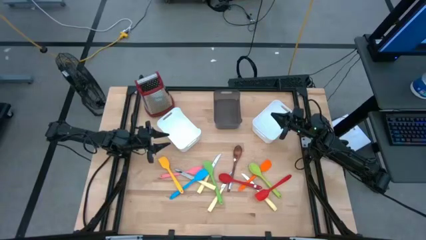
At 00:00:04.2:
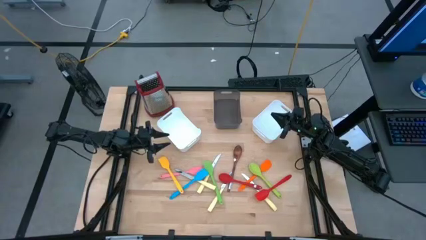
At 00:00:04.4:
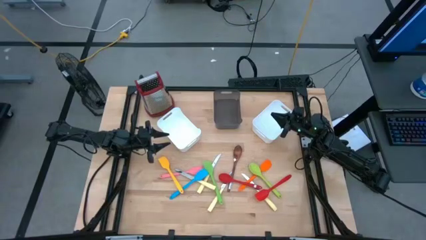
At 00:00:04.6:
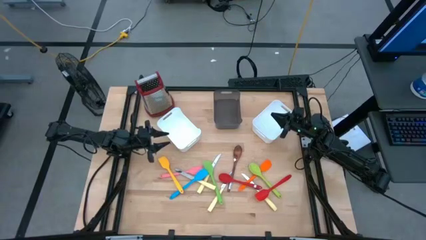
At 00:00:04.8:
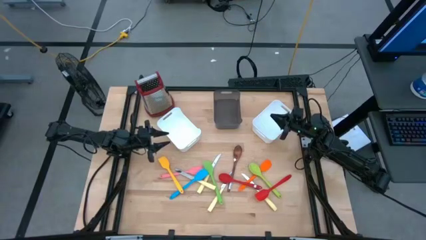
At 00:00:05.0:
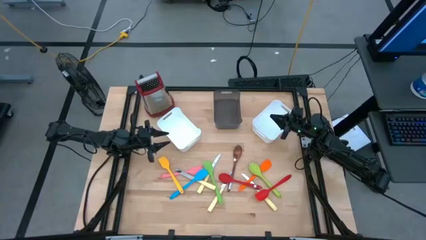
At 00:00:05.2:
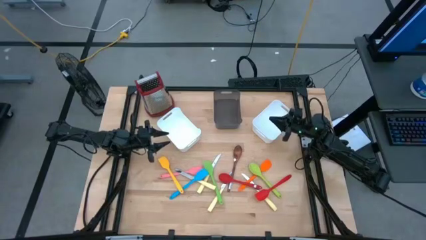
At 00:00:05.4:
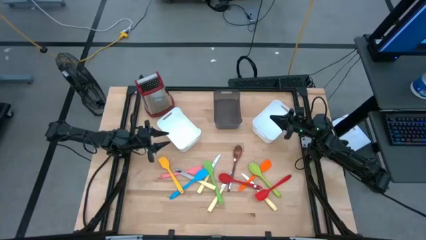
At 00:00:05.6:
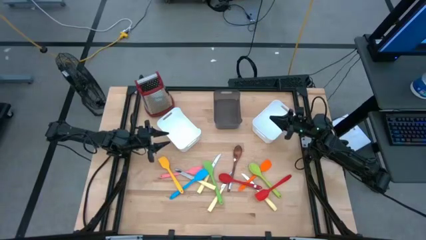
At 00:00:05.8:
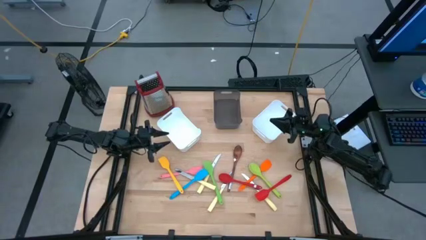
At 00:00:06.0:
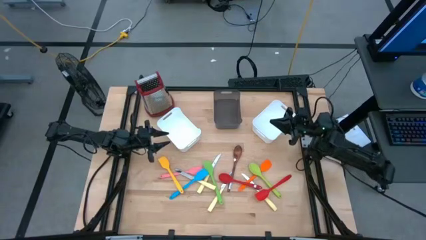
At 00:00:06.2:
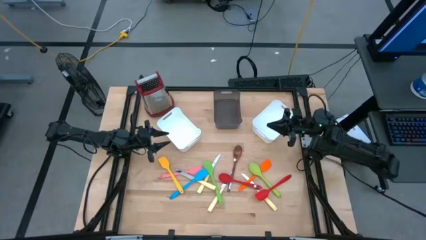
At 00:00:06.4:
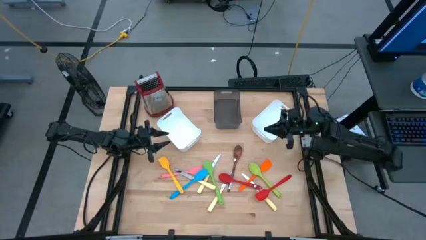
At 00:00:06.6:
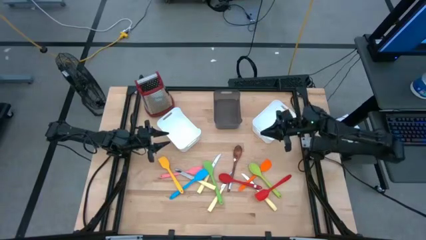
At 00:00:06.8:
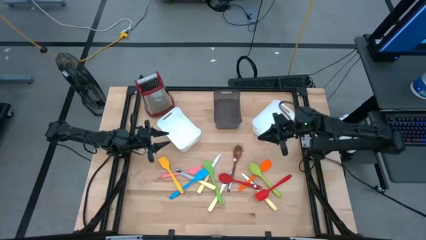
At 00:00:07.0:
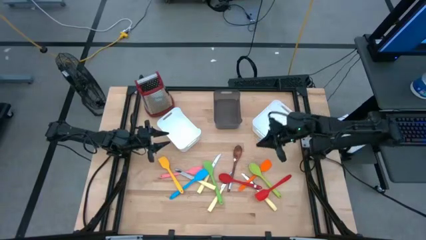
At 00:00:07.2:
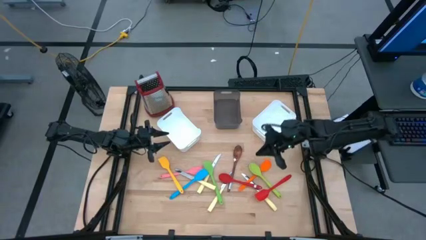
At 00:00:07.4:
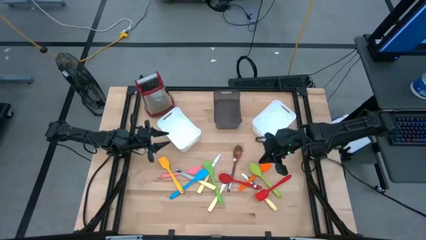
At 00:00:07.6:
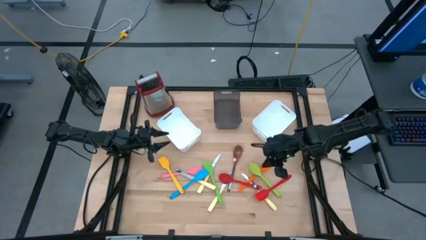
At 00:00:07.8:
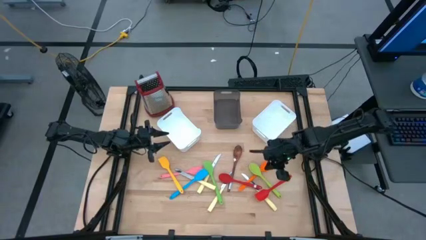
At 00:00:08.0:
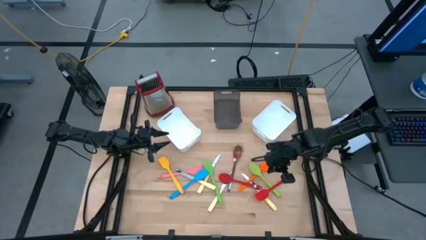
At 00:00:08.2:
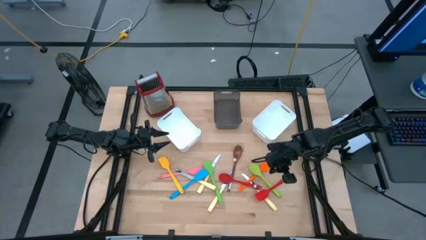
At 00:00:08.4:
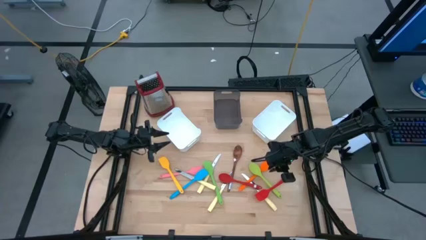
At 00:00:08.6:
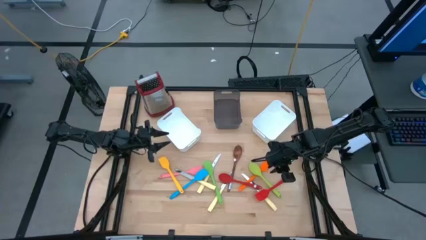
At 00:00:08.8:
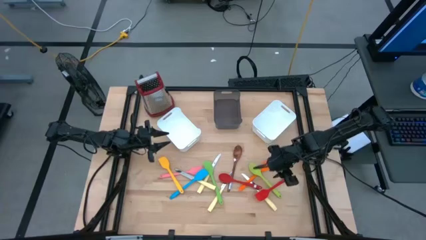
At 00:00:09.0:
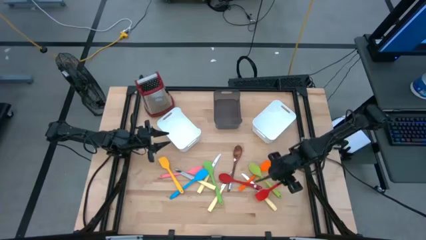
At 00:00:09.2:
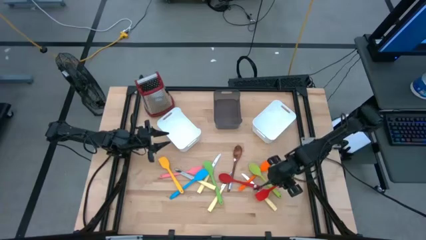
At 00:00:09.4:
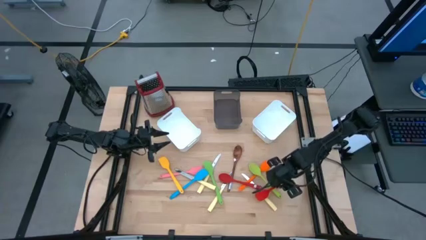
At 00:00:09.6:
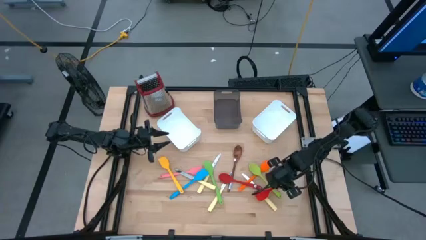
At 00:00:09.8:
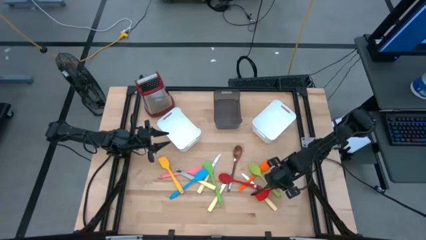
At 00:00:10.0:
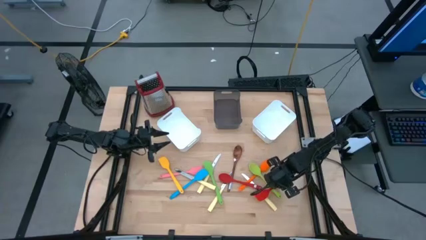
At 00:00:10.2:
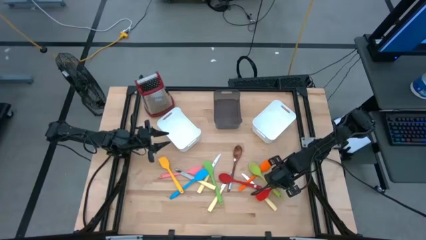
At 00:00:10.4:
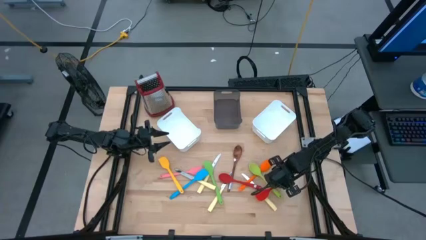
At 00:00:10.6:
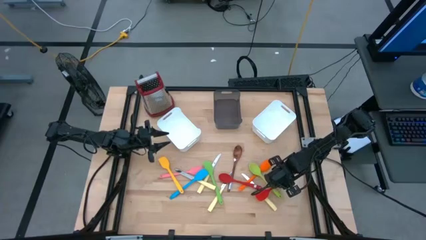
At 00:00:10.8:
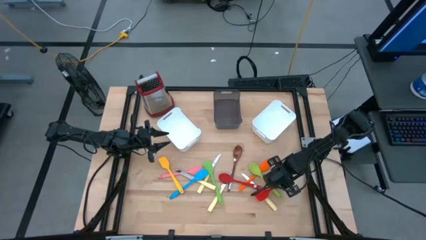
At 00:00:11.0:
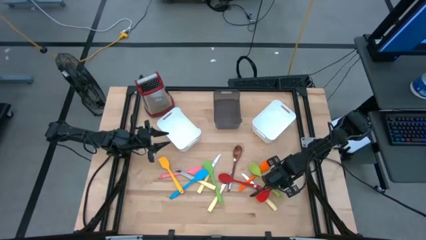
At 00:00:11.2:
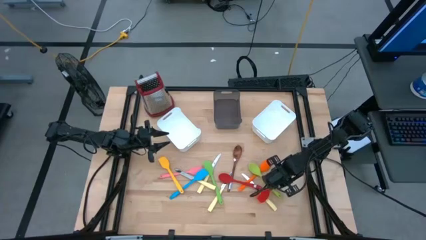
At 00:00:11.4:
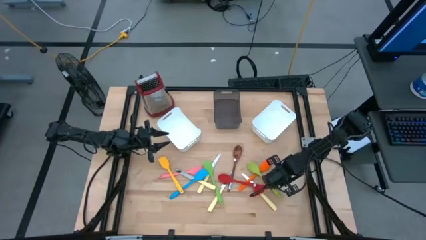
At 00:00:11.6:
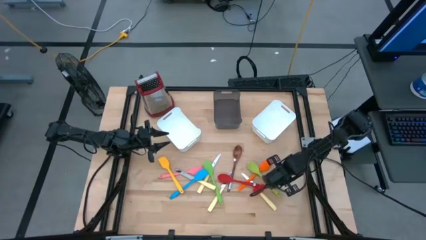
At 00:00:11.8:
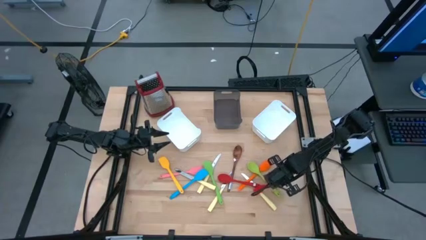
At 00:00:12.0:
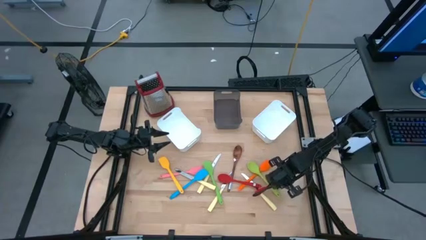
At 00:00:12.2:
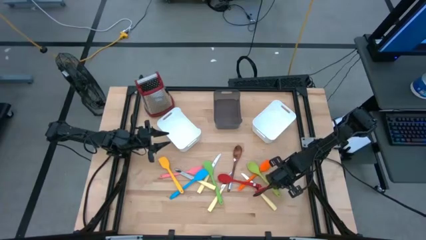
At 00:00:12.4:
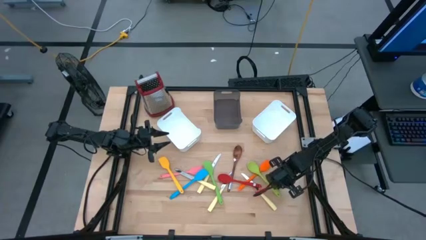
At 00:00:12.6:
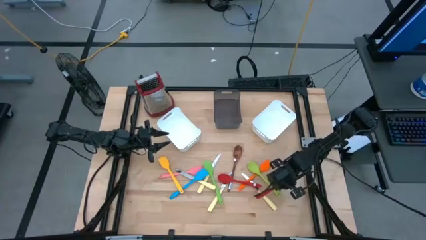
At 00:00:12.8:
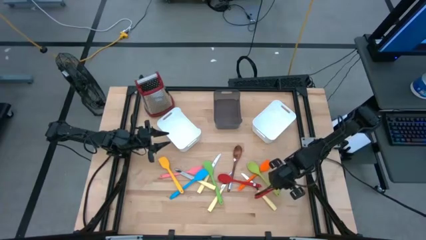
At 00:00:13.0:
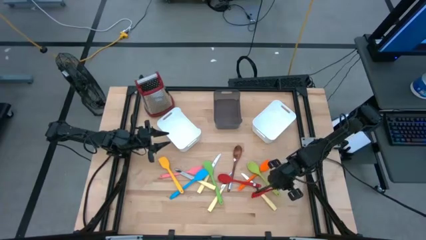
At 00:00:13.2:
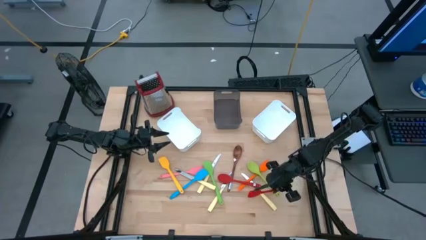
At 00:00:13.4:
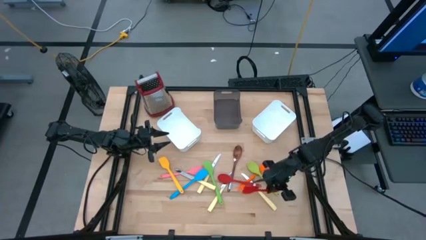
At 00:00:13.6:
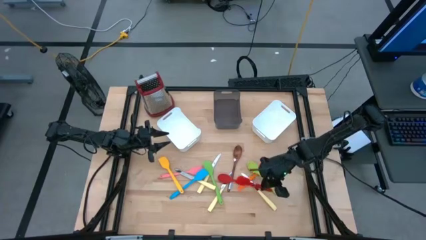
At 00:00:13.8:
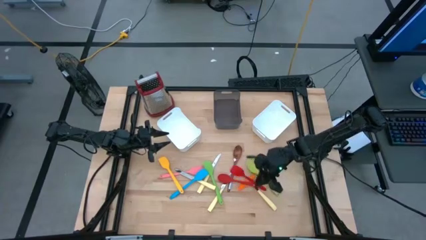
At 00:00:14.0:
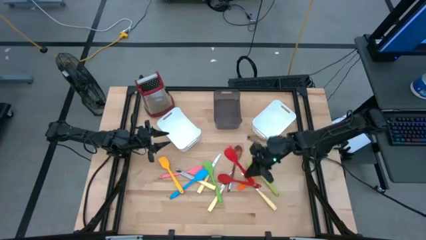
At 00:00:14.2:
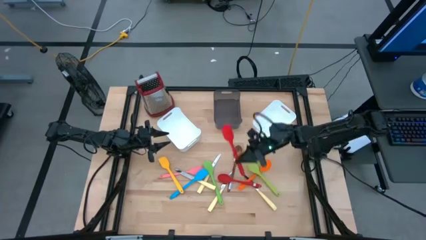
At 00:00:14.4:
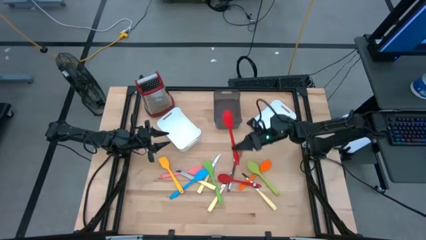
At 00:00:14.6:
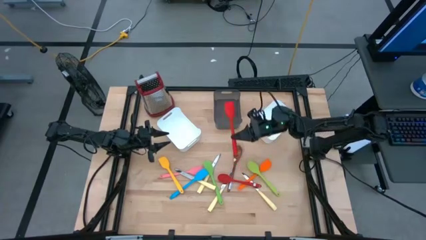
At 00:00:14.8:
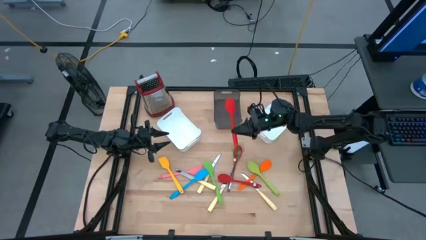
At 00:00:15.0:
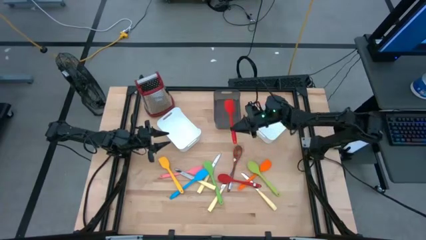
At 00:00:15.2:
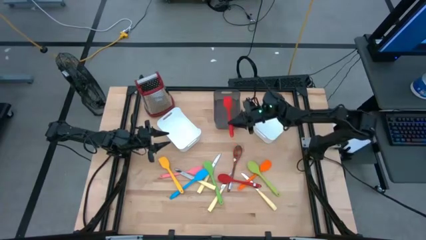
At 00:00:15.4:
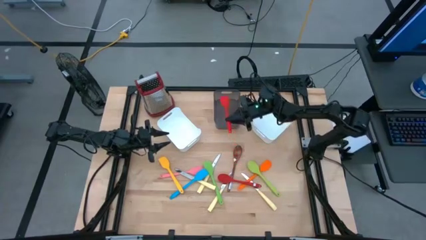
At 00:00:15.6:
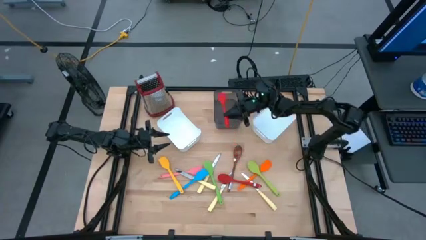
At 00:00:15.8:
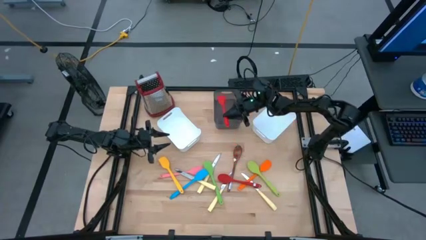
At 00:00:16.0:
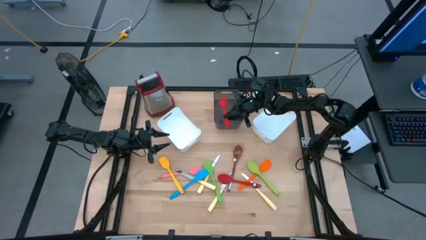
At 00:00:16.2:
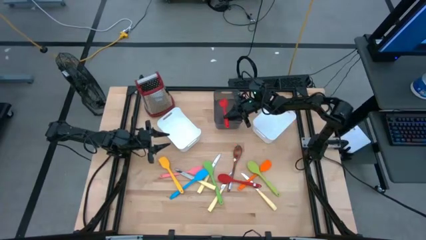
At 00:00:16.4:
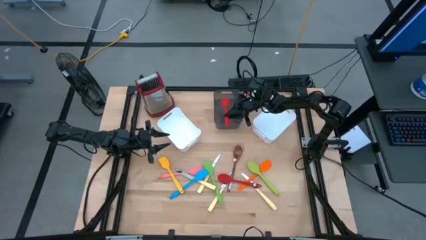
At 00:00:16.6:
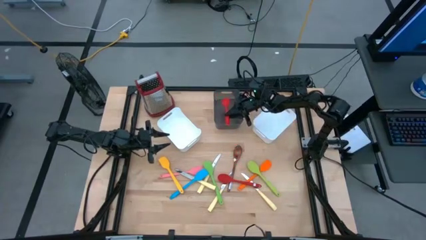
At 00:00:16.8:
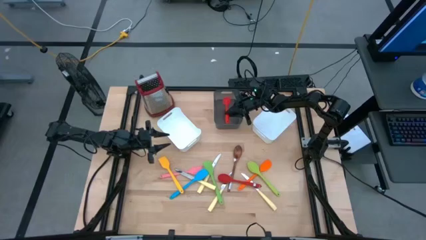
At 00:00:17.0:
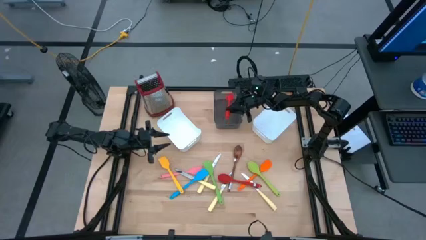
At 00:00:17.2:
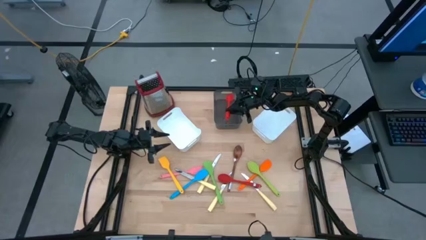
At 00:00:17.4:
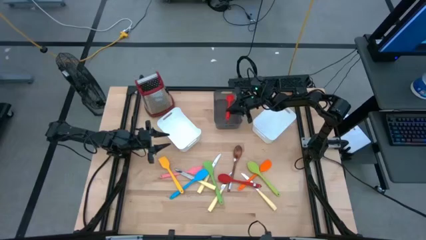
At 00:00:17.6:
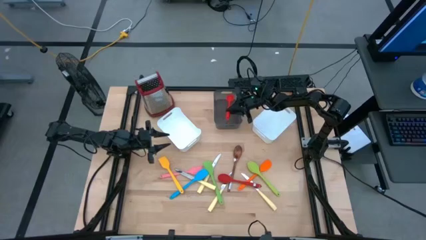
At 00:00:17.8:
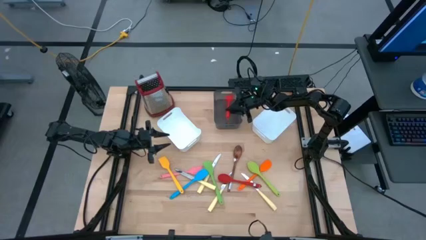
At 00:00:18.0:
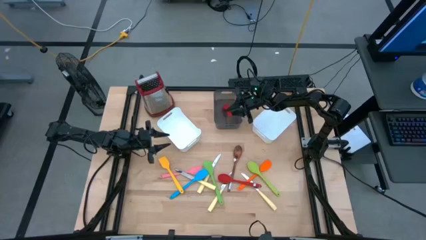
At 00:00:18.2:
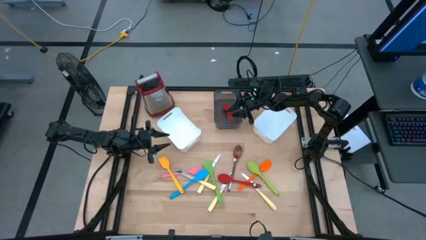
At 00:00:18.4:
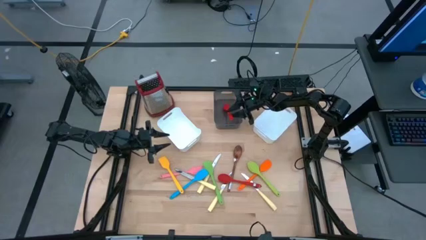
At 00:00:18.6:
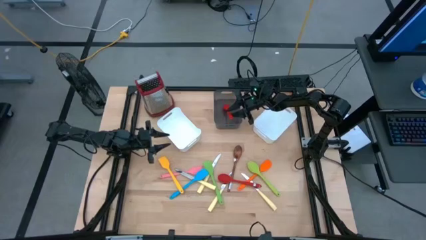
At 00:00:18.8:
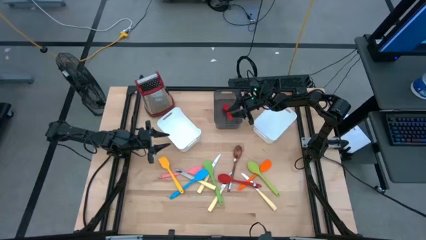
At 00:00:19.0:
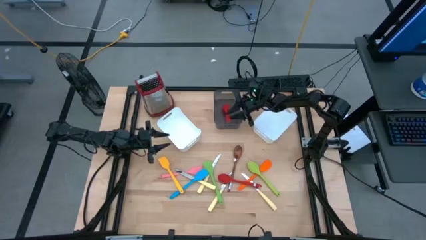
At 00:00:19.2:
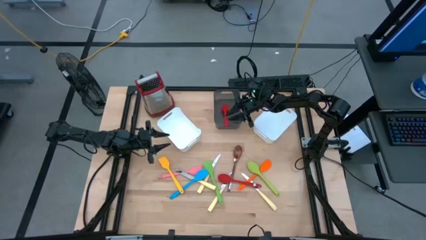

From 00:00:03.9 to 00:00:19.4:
Task: Pick & Place Kitchen Items
Put the red spatula into the black bin
